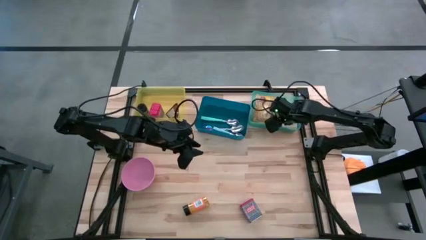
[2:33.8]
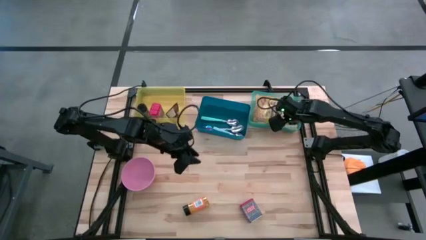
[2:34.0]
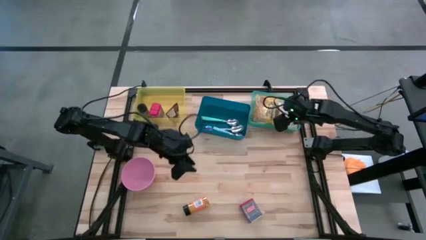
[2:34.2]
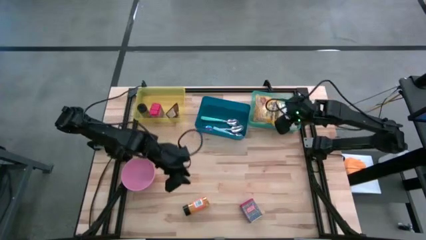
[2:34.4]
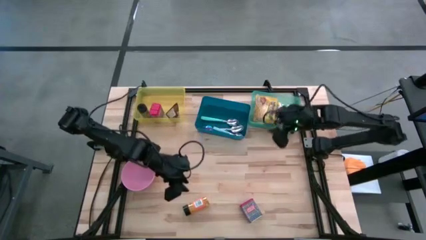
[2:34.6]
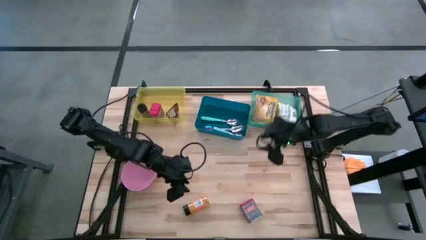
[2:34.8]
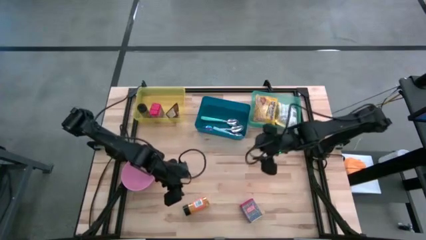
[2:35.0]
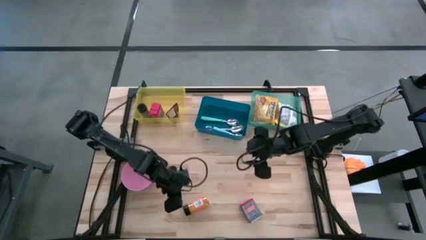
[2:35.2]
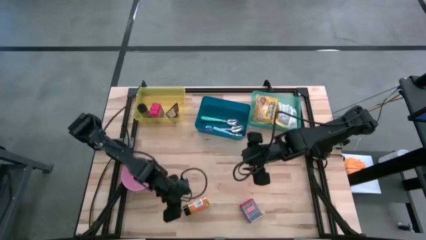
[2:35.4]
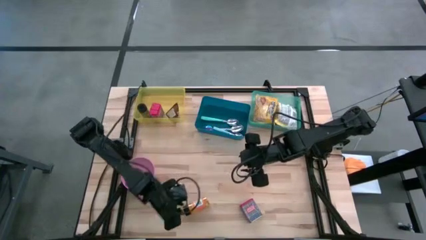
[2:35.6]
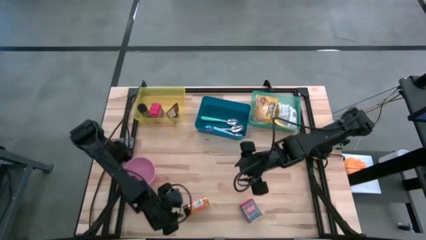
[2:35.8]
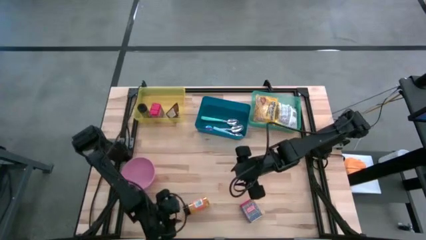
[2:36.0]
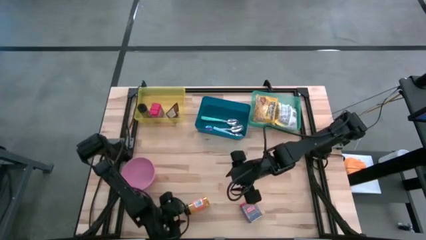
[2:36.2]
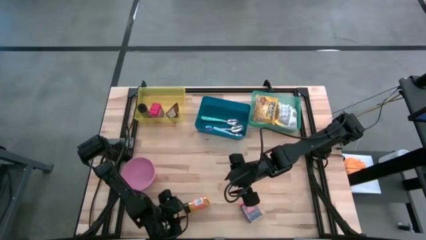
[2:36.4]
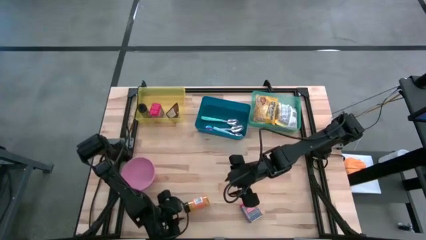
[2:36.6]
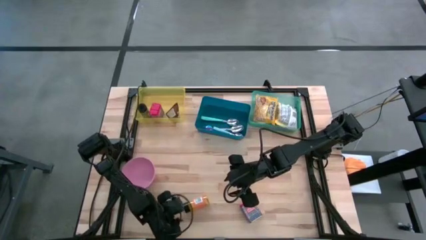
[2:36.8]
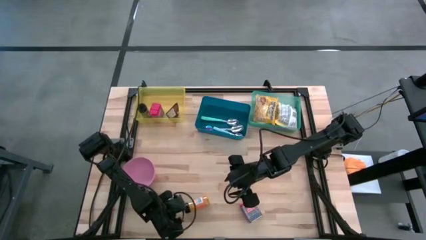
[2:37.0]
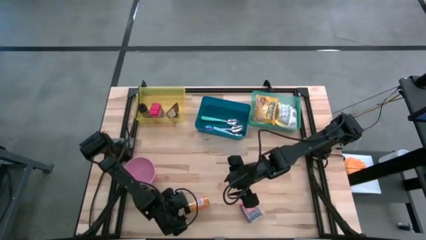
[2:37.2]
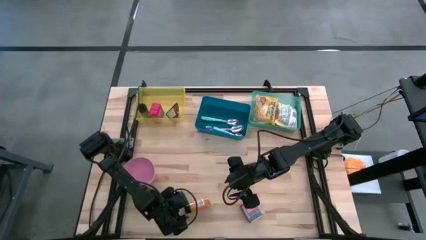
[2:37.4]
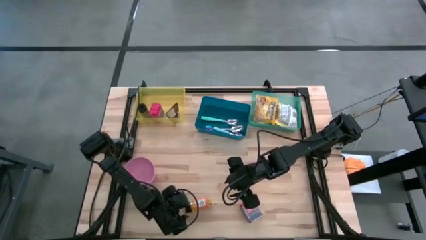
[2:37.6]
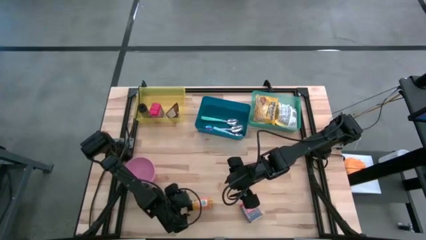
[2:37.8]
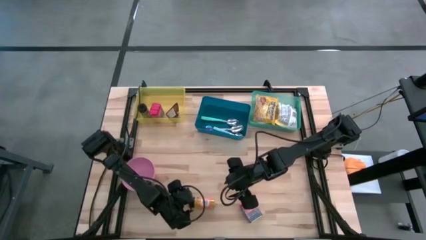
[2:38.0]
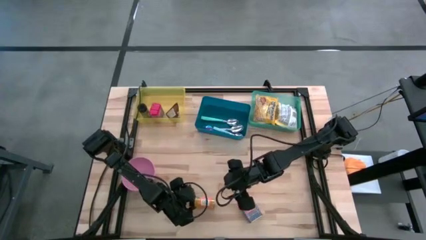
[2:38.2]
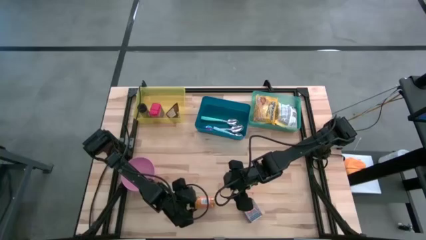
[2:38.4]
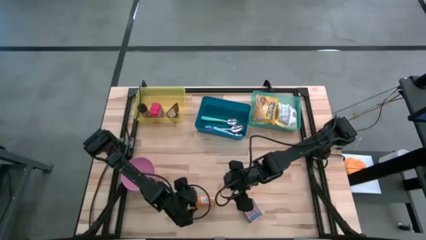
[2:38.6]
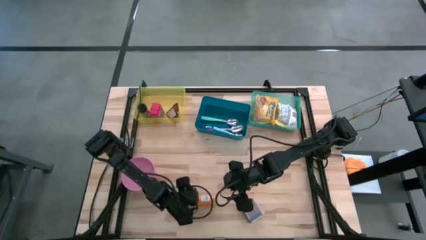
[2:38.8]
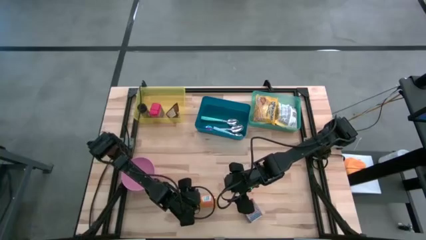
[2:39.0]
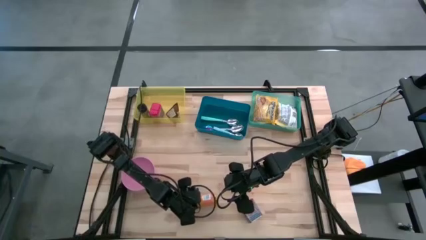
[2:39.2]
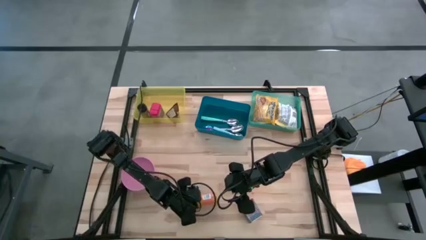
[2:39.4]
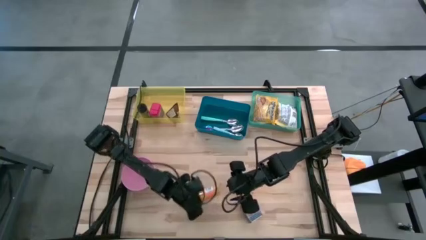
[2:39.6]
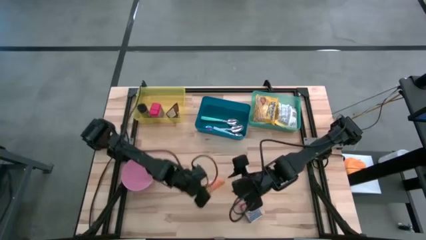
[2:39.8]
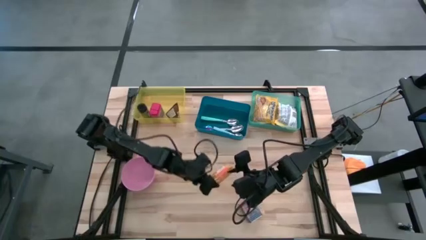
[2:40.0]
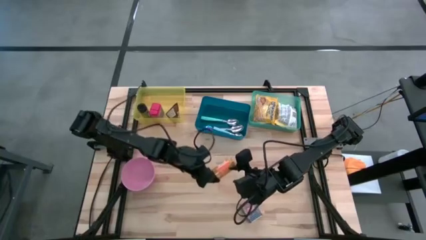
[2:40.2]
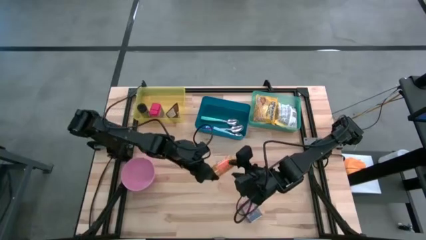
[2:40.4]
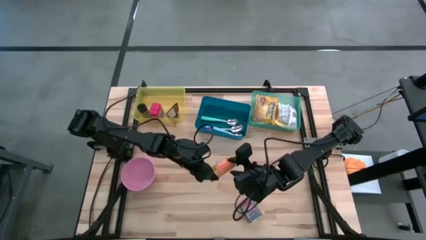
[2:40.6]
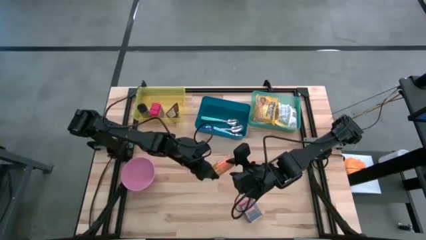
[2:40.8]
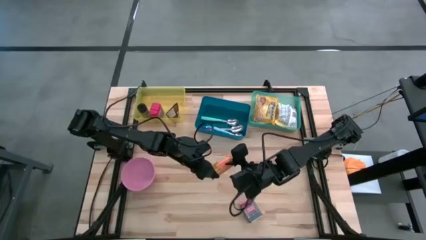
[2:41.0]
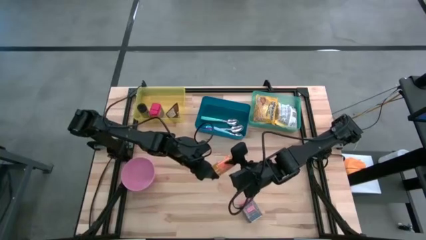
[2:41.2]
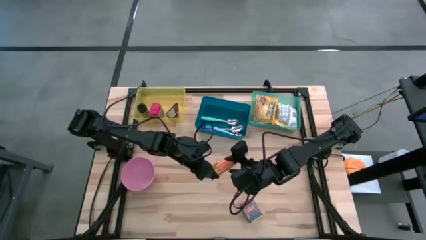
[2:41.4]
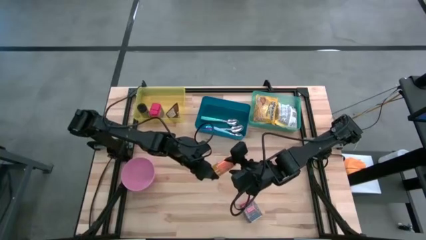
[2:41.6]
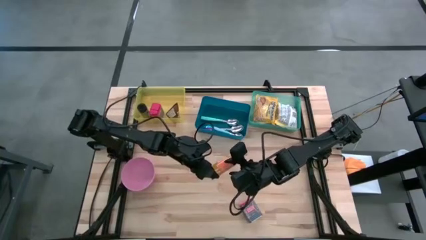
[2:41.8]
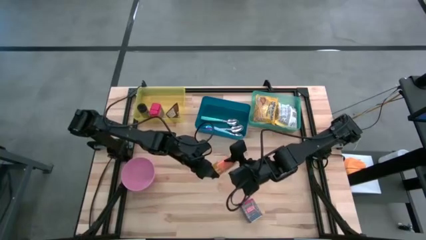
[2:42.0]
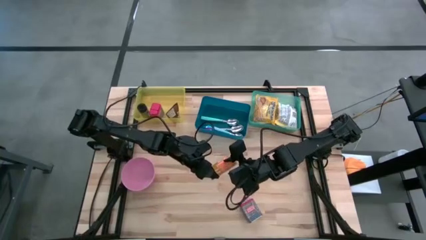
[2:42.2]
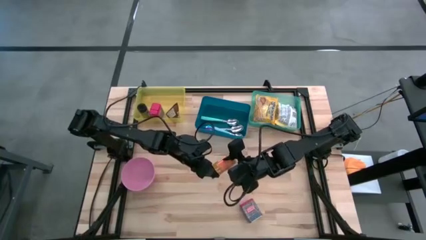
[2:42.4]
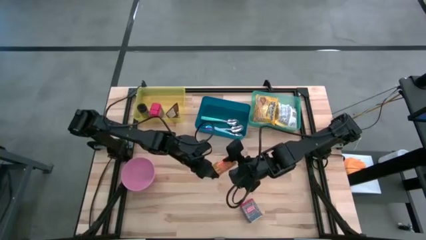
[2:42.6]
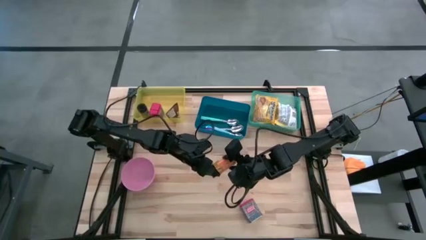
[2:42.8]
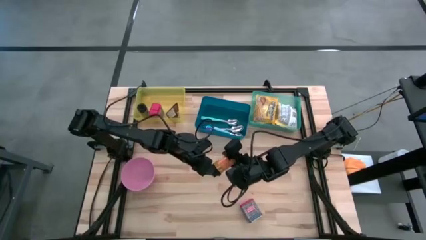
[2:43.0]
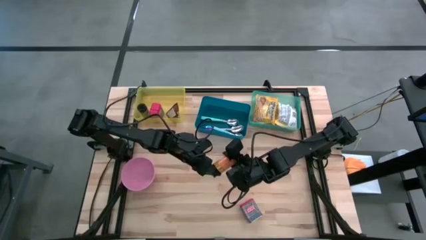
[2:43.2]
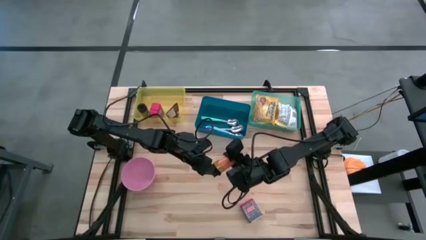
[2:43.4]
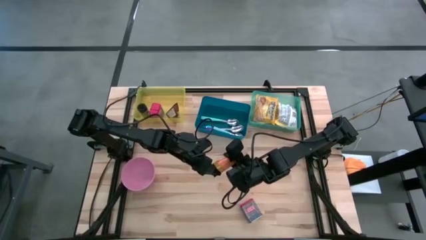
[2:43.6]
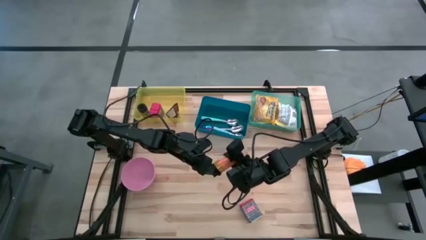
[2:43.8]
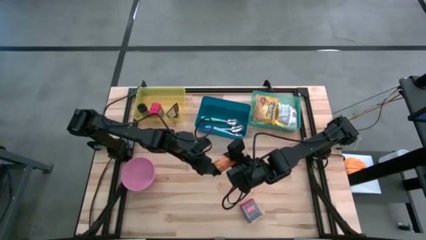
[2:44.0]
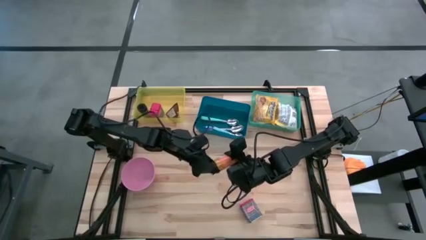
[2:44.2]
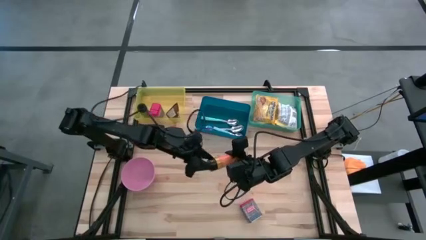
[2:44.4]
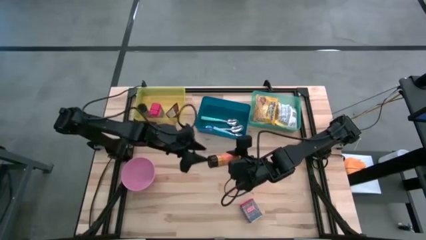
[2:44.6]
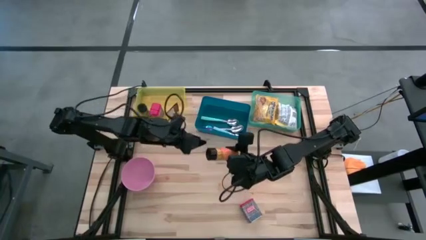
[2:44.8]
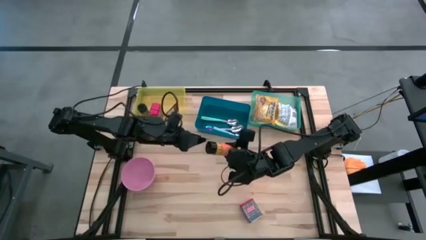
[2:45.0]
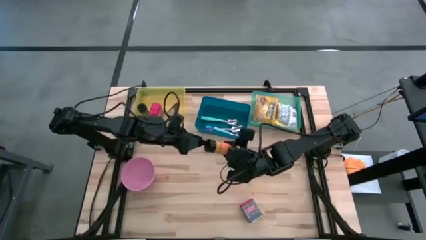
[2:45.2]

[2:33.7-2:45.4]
Put the black seasoning bottle into the yellow bin

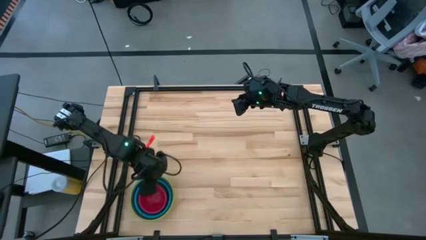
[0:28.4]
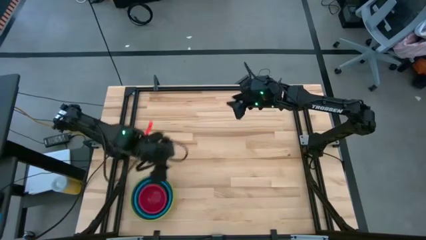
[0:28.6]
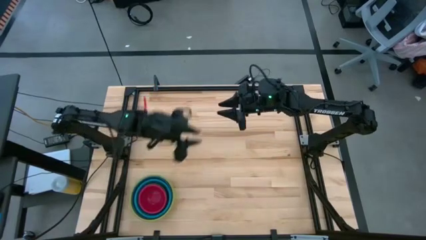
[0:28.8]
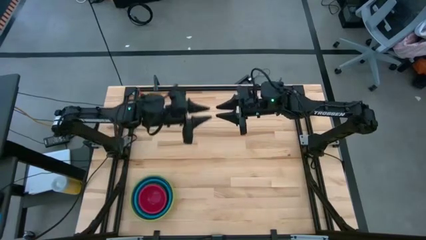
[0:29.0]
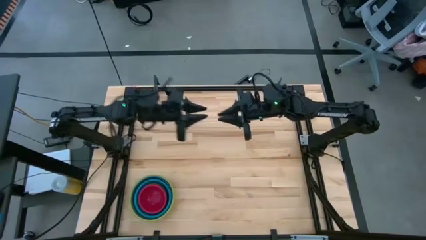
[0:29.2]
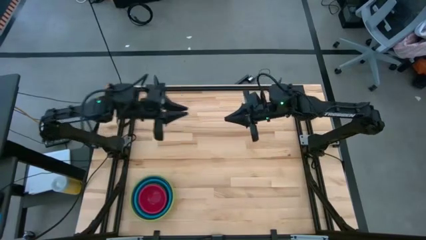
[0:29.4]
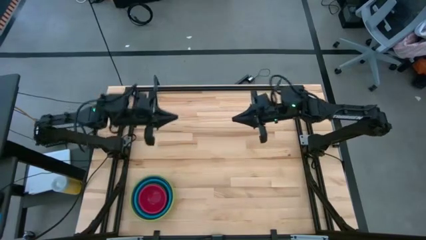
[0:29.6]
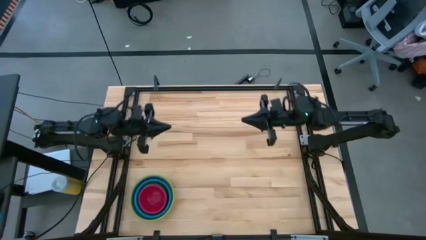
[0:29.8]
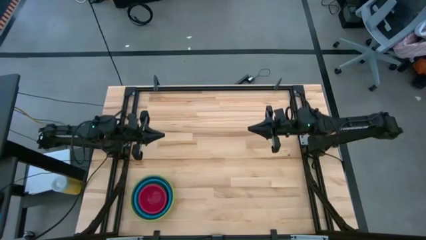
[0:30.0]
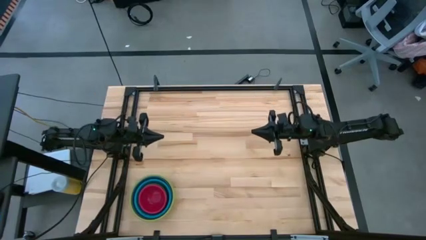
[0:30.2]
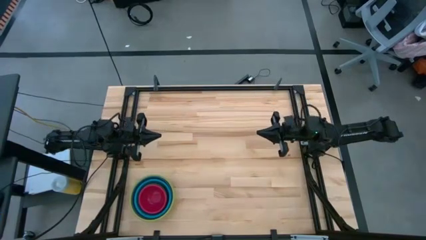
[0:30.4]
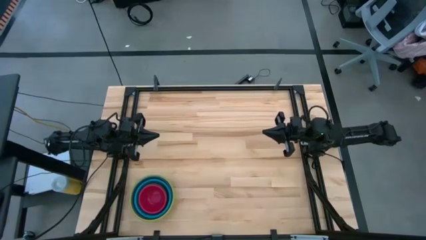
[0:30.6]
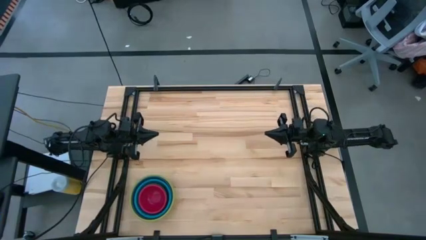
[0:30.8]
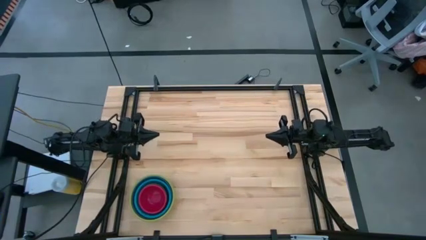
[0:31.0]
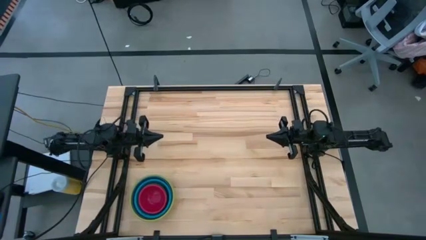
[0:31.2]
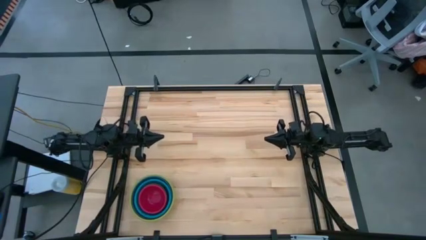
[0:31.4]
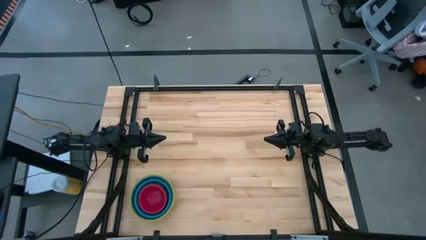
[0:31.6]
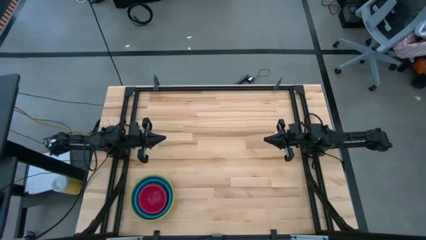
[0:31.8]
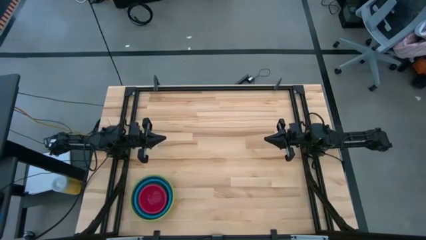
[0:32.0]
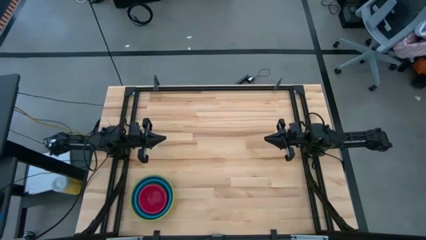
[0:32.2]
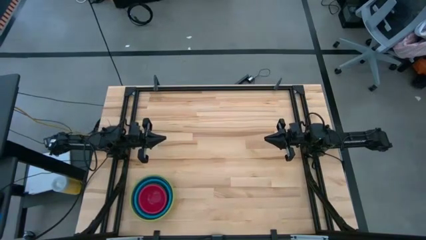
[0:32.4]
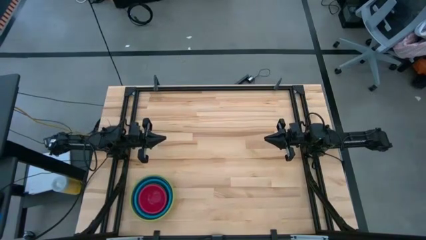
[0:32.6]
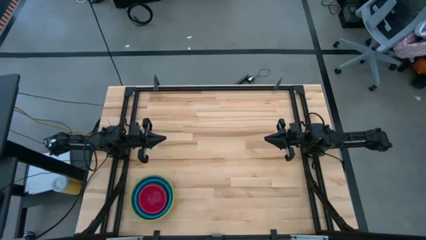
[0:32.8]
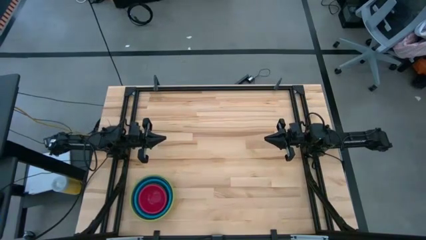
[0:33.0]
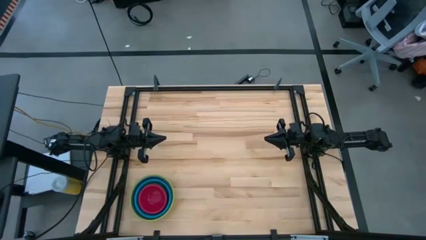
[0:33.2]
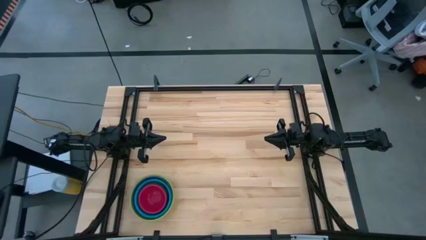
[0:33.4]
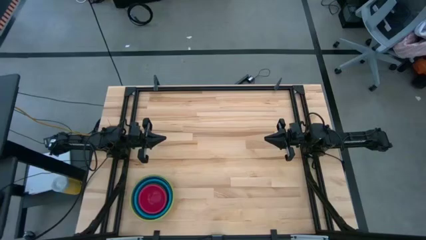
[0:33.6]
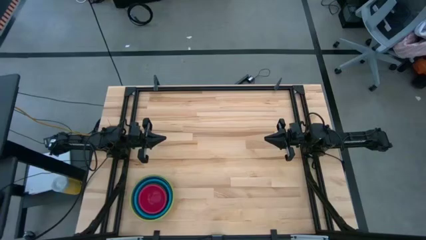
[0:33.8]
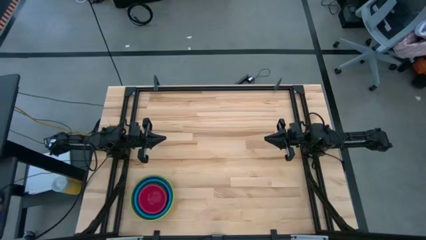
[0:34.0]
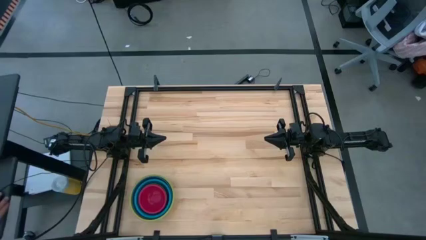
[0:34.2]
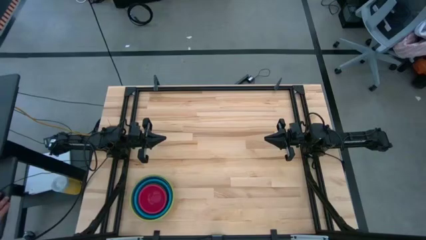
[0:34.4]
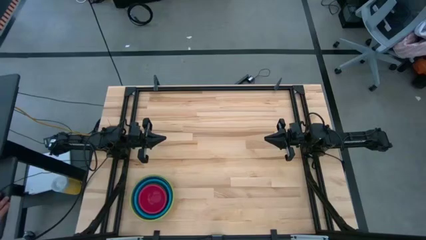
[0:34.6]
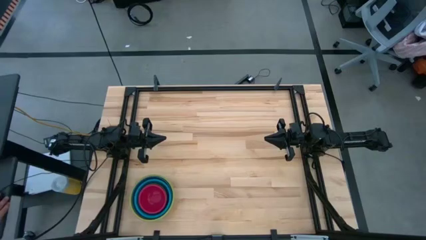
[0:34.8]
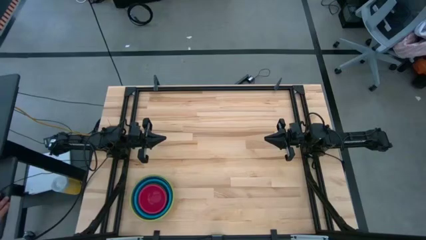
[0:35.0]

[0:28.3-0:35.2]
Return to Home Position
